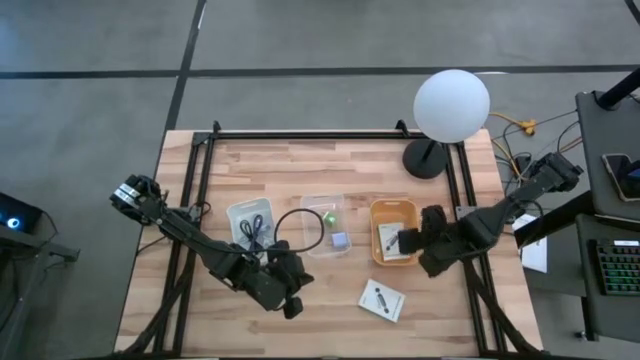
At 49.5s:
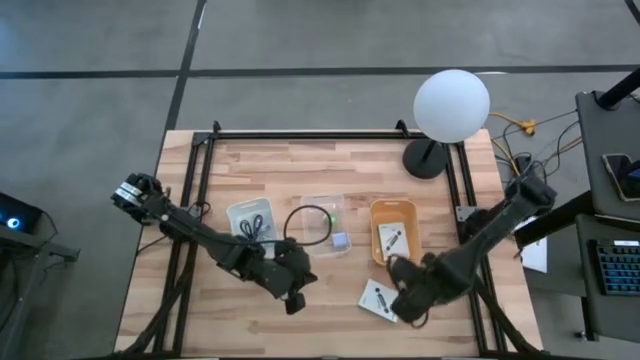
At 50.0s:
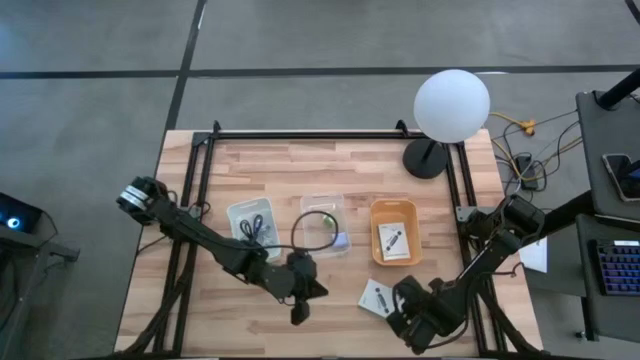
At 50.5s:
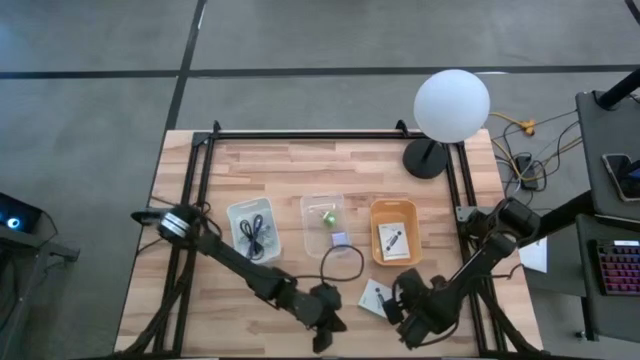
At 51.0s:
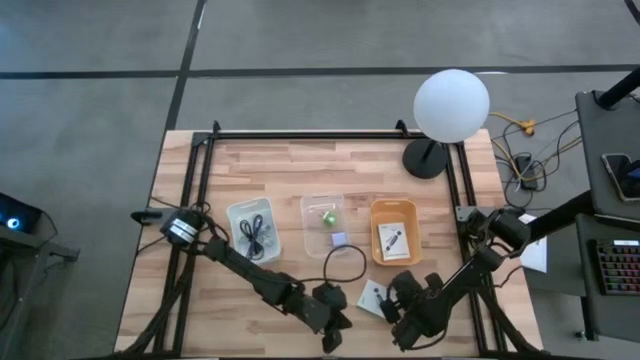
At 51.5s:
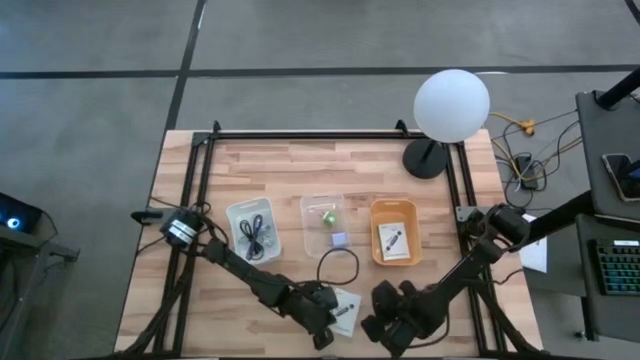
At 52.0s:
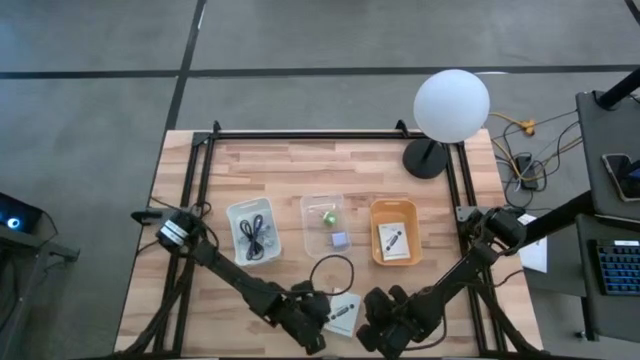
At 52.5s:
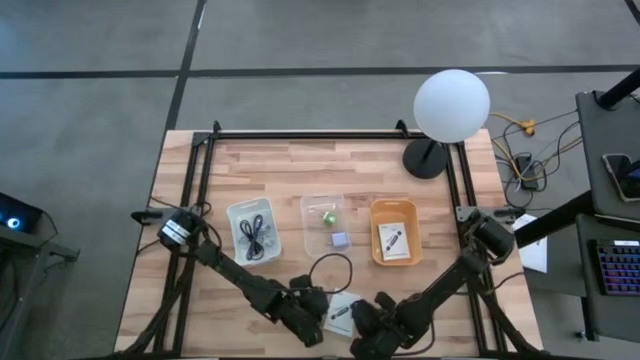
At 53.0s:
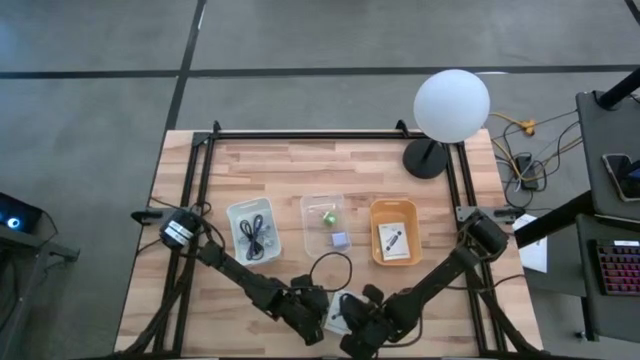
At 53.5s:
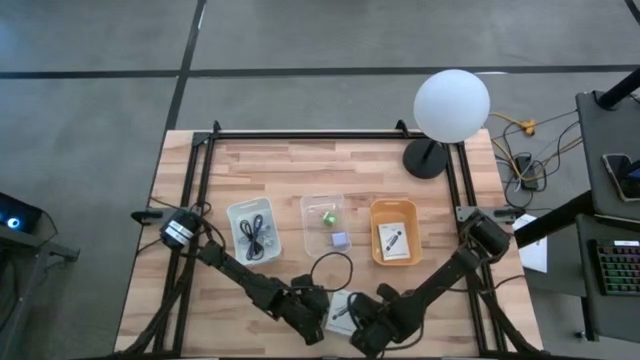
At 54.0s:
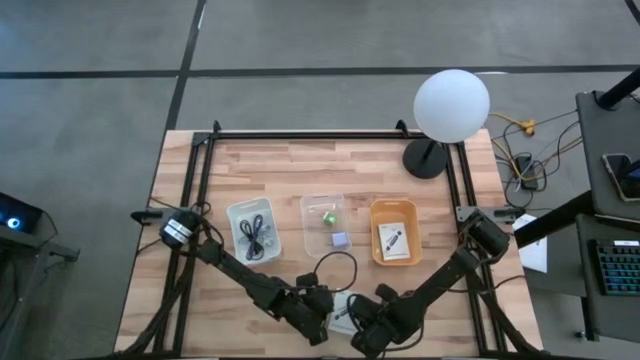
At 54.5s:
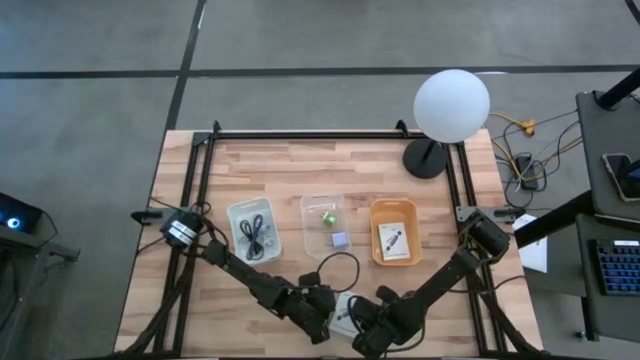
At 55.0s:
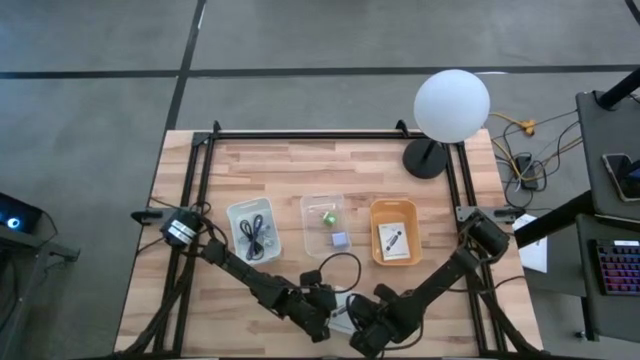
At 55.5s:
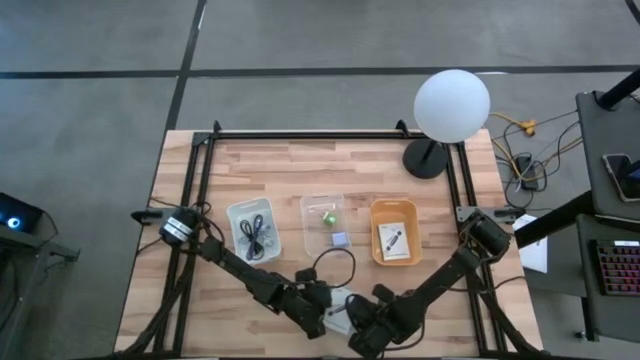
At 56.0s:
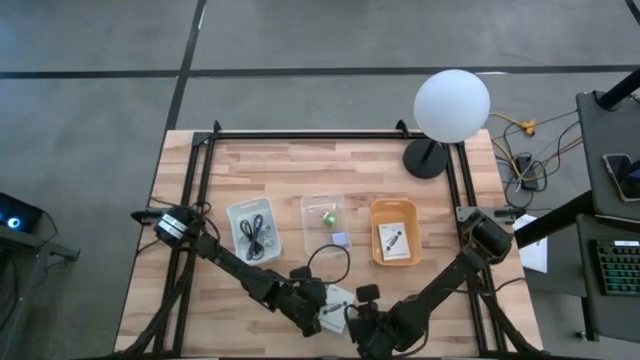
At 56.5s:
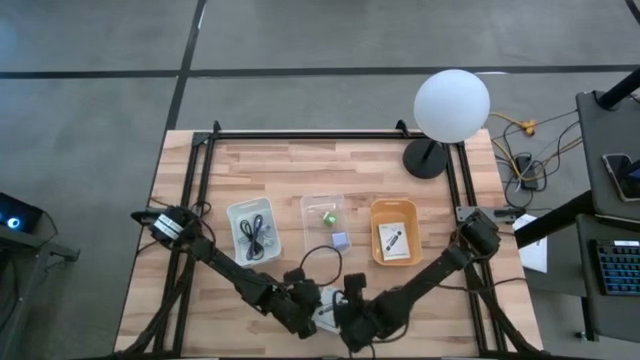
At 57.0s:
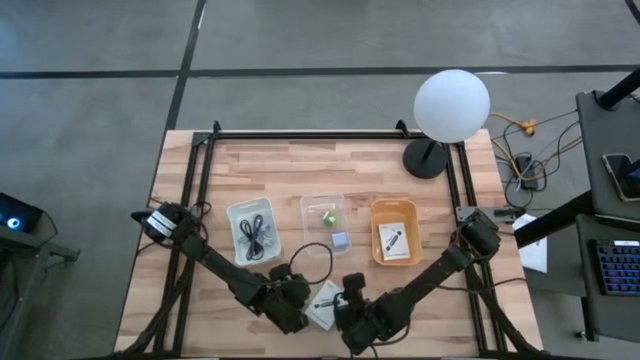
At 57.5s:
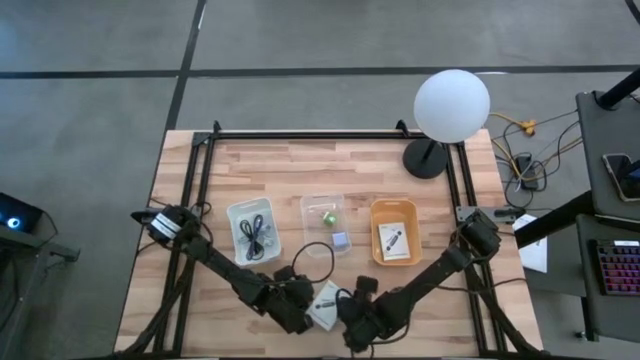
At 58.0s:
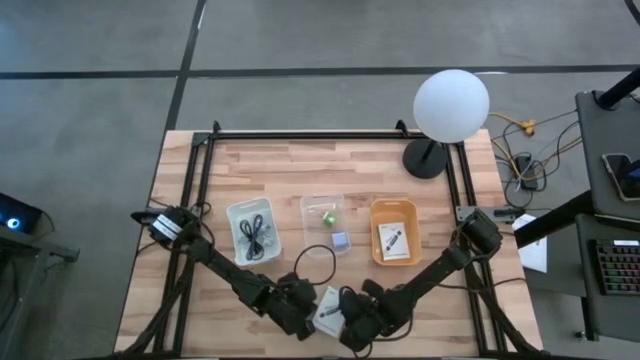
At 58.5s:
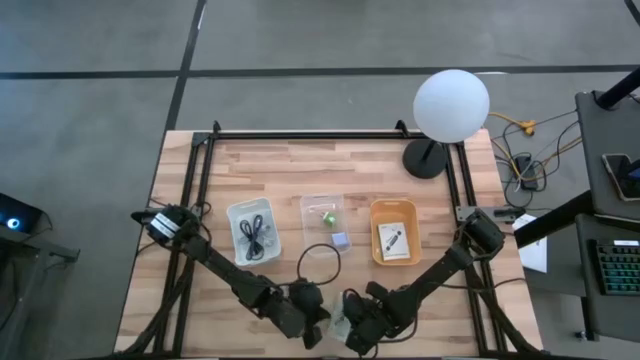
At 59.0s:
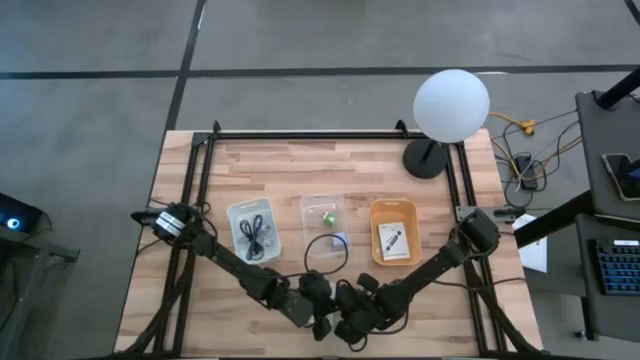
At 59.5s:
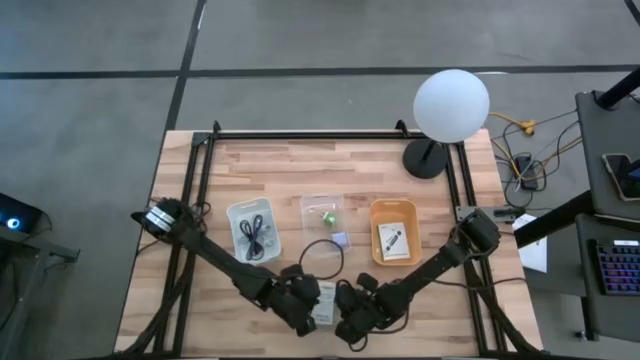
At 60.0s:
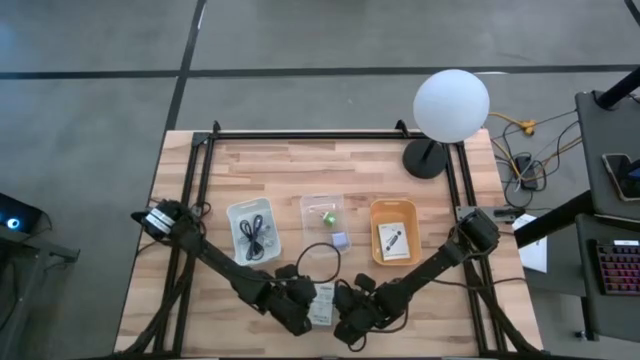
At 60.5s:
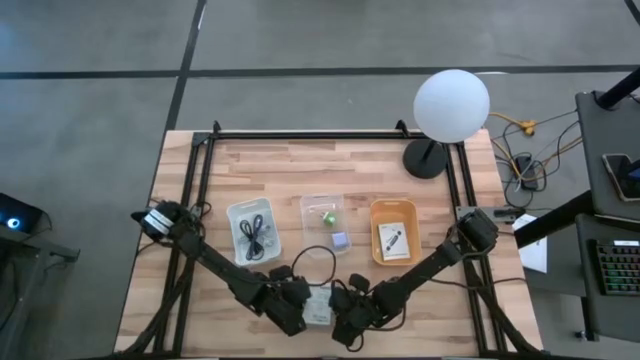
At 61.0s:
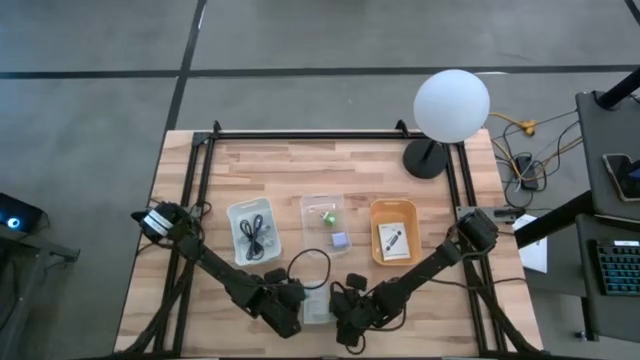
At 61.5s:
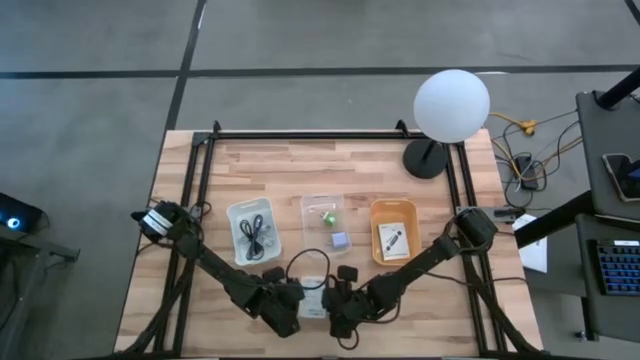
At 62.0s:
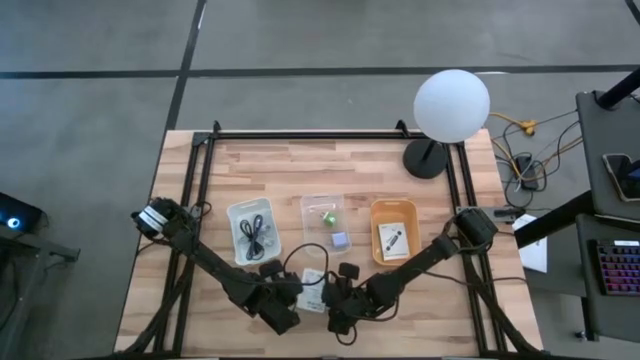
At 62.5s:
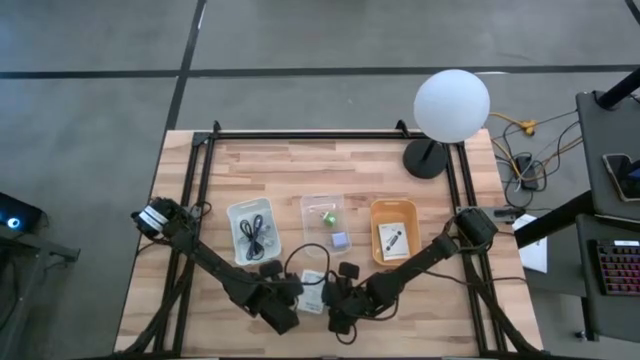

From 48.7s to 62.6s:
Task: Pick and place items into bin
Put the white card reader box into the yellow bin

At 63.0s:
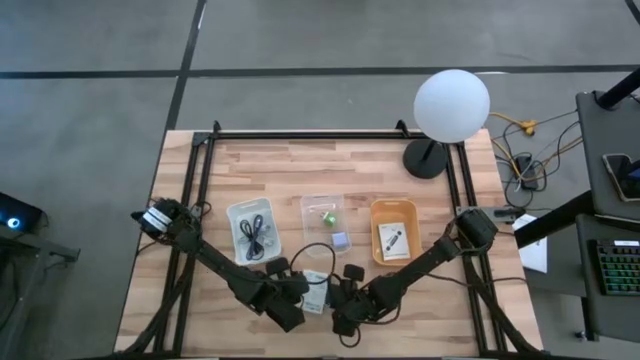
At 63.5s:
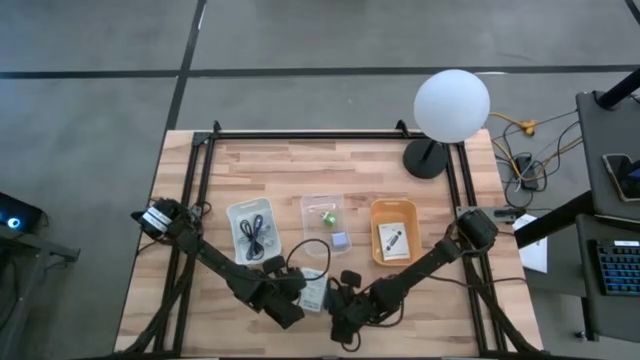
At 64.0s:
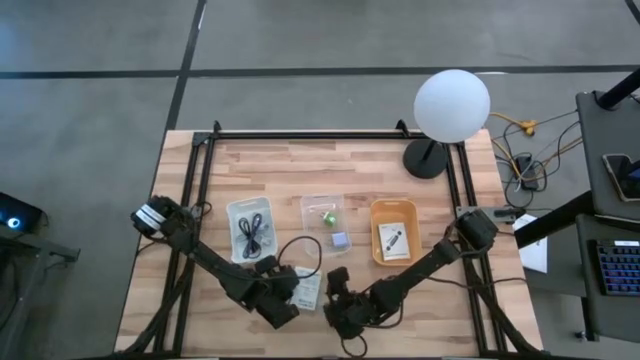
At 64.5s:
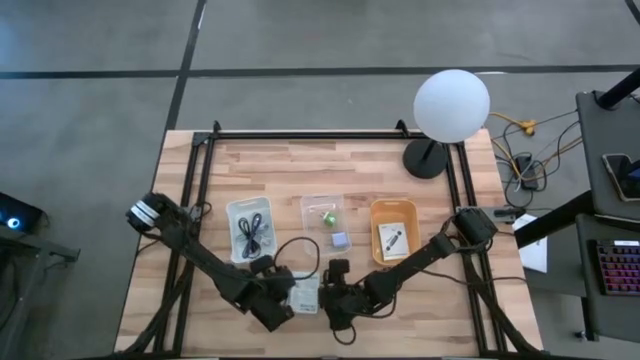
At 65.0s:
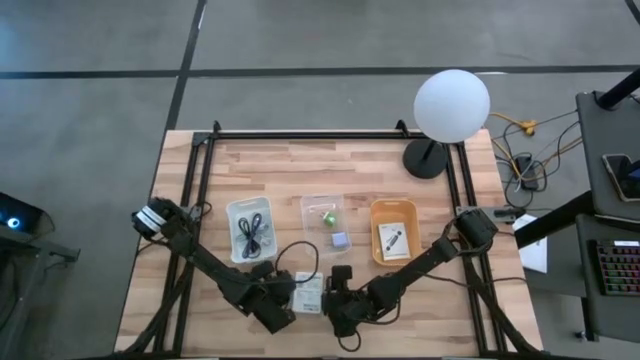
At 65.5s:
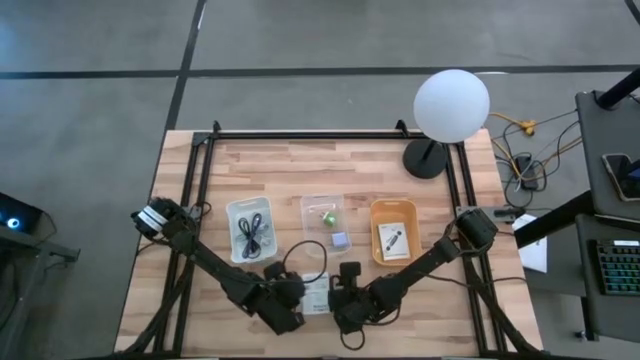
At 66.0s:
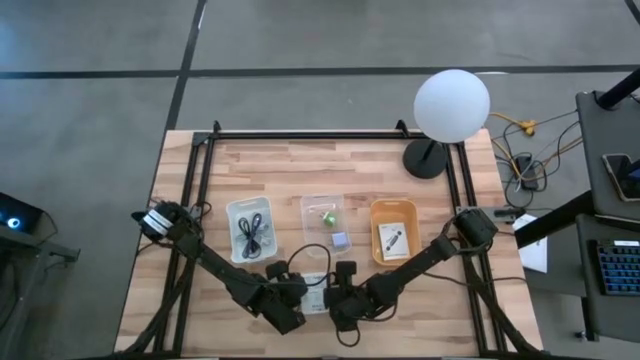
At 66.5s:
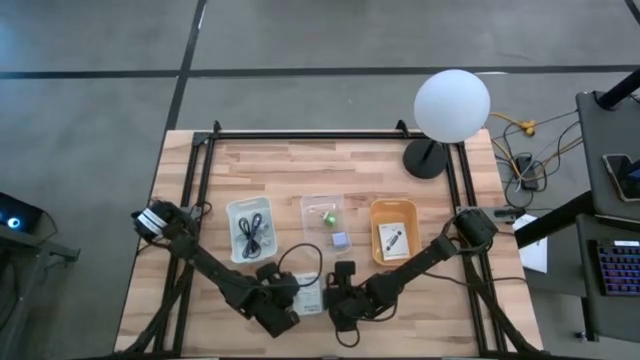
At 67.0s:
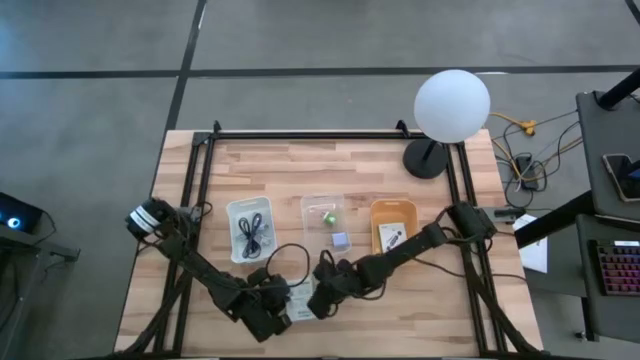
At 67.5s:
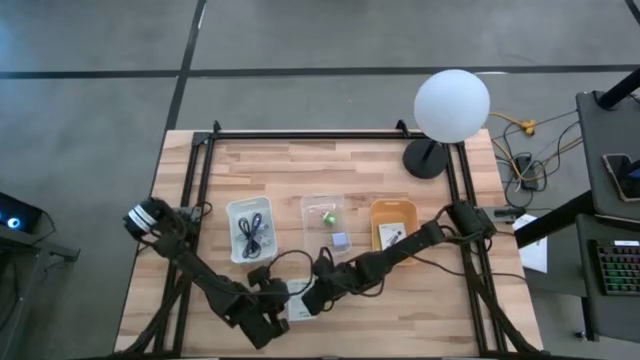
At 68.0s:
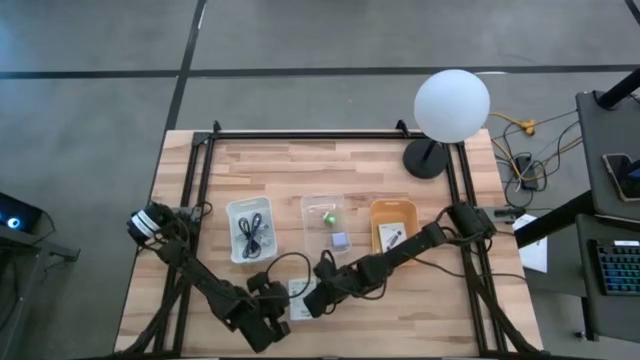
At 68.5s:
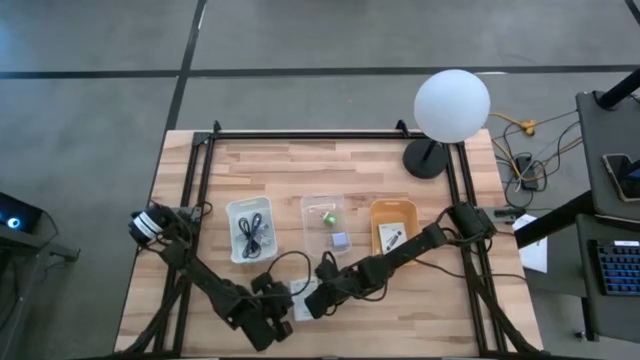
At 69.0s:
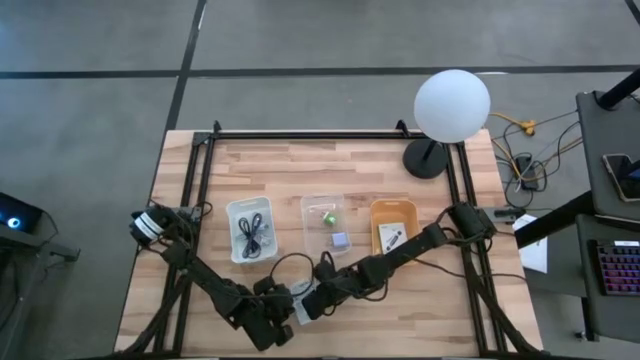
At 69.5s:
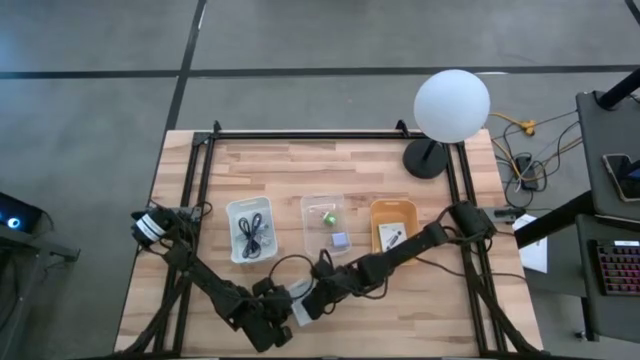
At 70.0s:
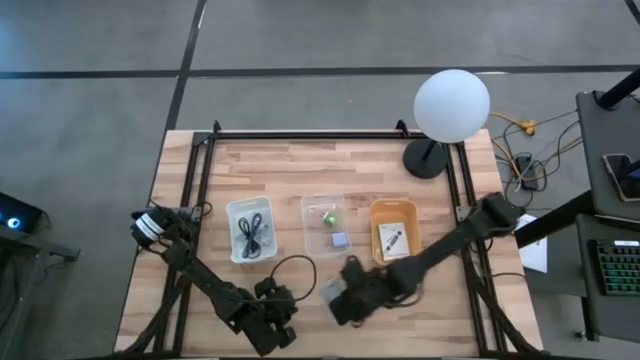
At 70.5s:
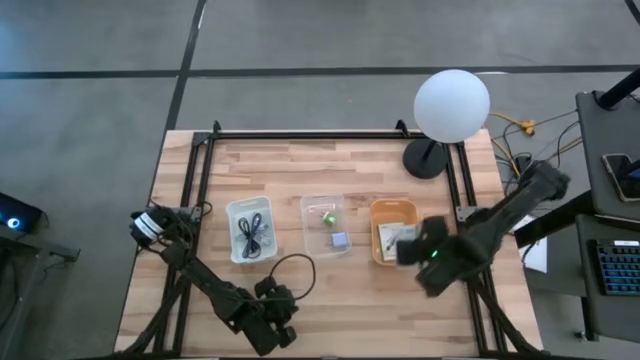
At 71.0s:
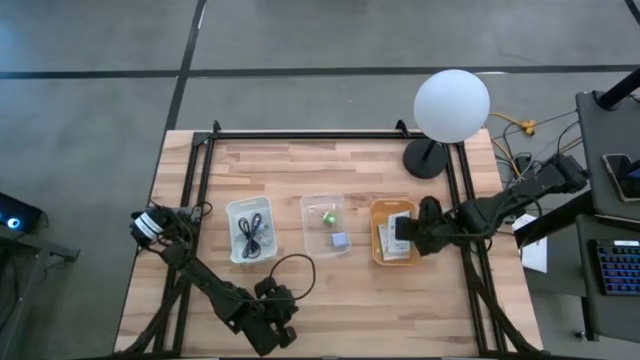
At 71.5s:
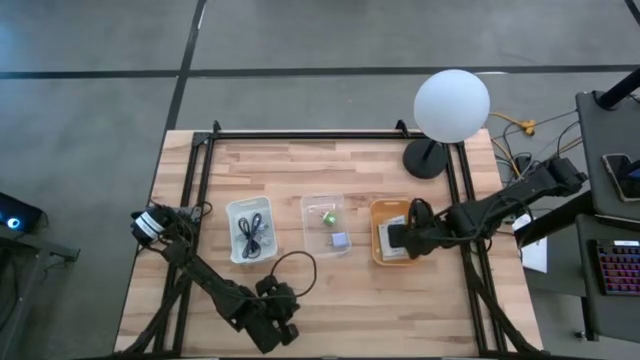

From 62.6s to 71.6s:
Put the white card reader box into the yellow bin
